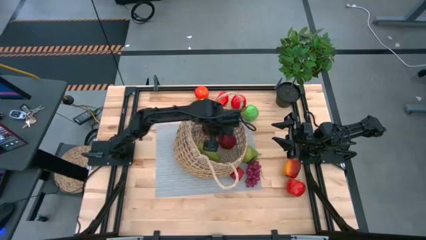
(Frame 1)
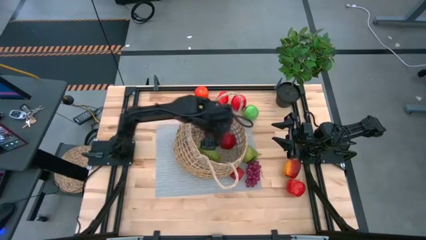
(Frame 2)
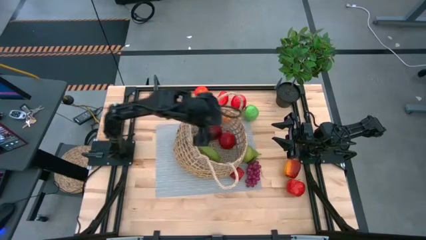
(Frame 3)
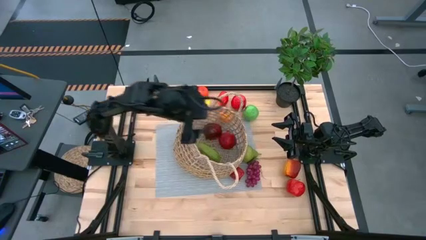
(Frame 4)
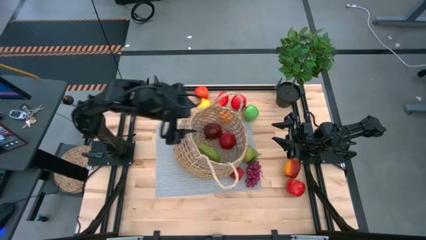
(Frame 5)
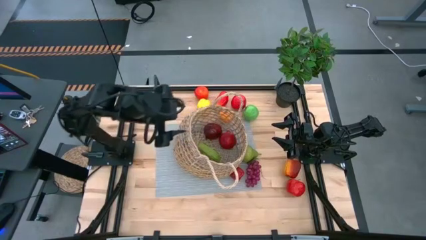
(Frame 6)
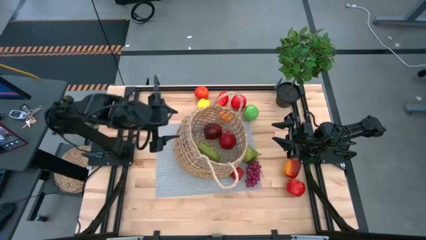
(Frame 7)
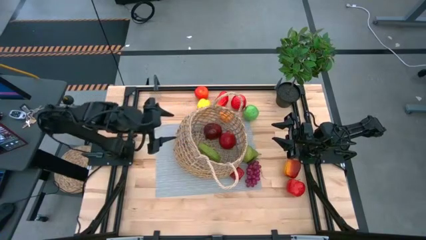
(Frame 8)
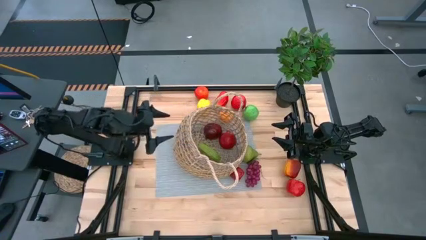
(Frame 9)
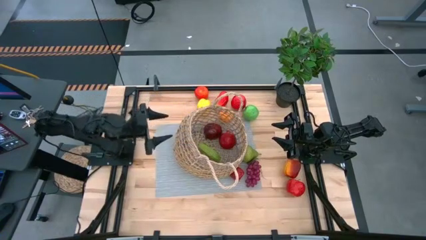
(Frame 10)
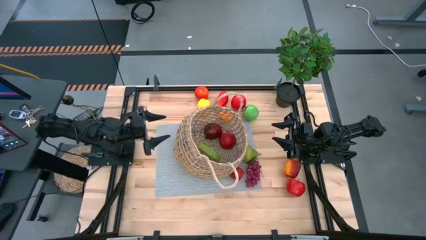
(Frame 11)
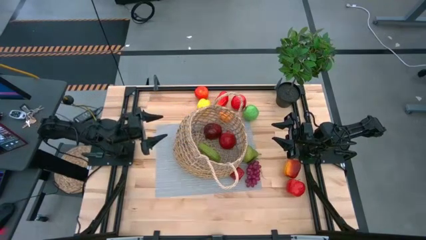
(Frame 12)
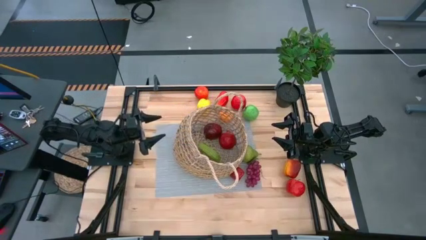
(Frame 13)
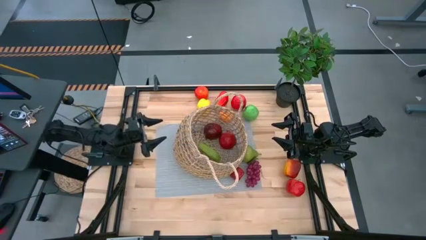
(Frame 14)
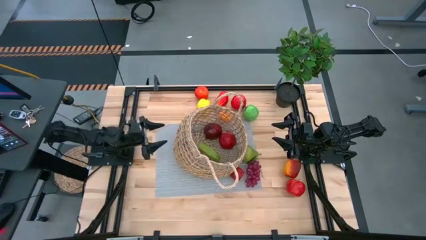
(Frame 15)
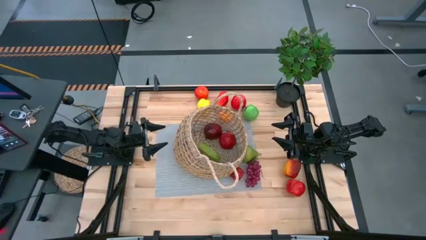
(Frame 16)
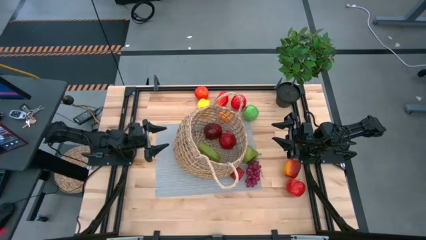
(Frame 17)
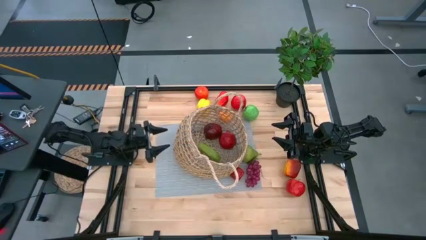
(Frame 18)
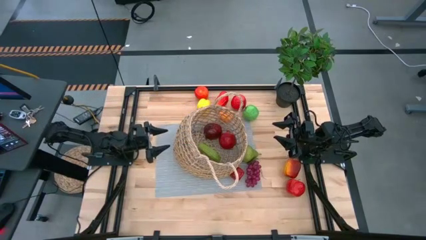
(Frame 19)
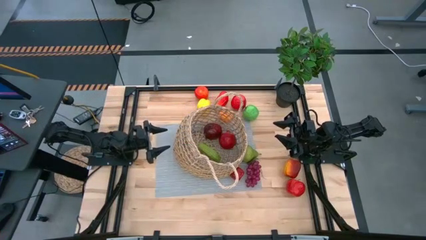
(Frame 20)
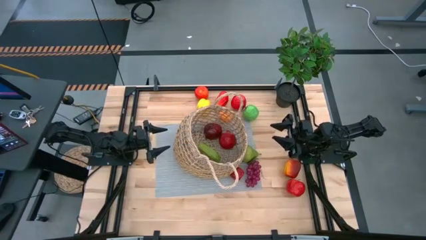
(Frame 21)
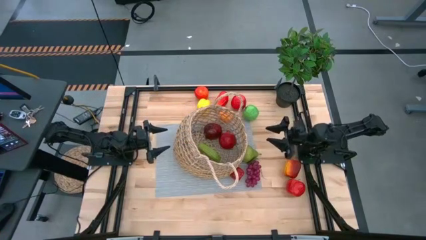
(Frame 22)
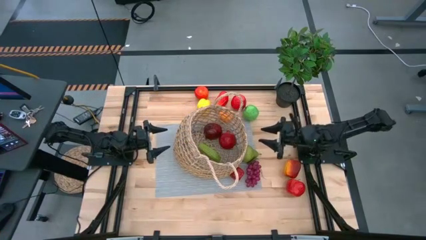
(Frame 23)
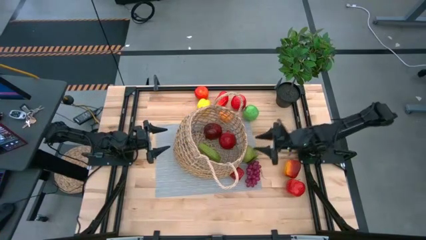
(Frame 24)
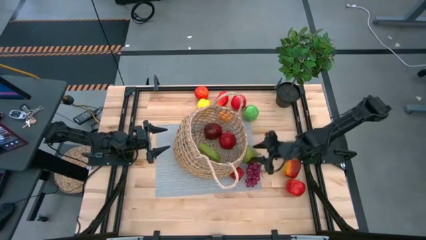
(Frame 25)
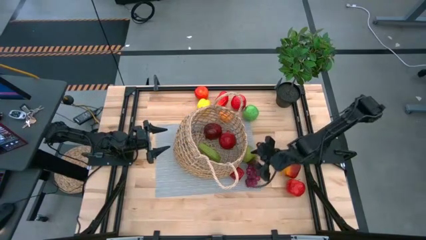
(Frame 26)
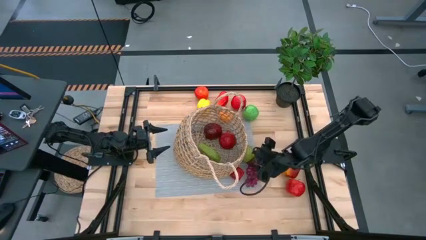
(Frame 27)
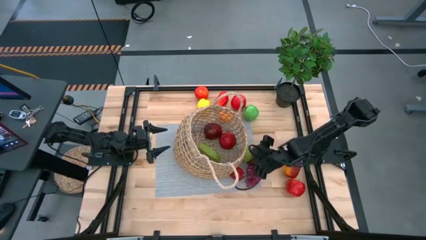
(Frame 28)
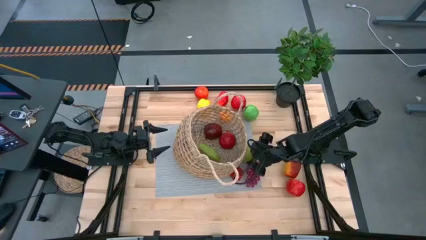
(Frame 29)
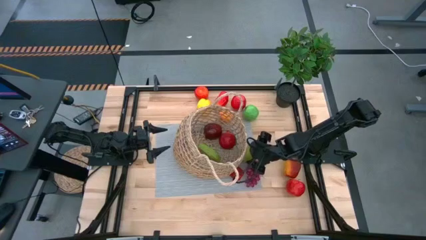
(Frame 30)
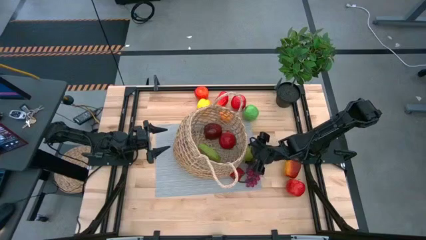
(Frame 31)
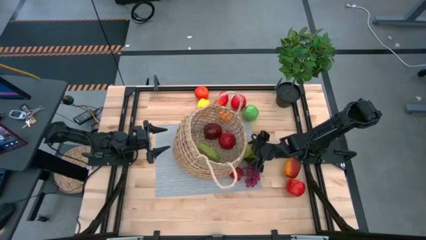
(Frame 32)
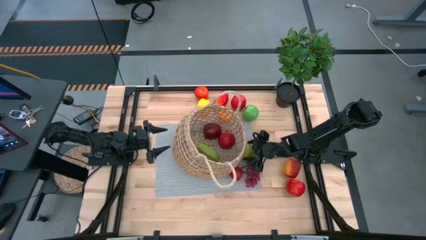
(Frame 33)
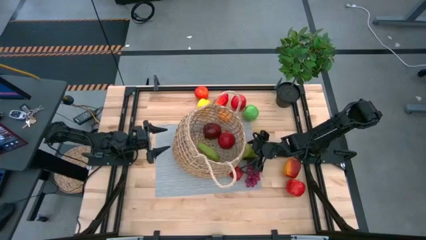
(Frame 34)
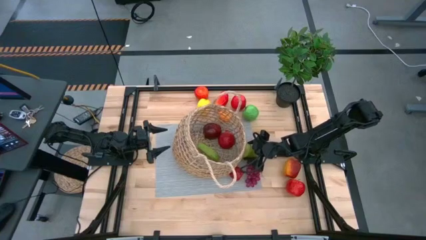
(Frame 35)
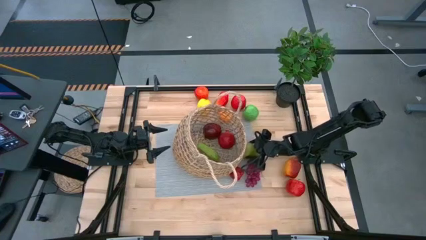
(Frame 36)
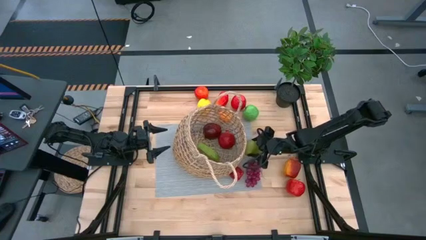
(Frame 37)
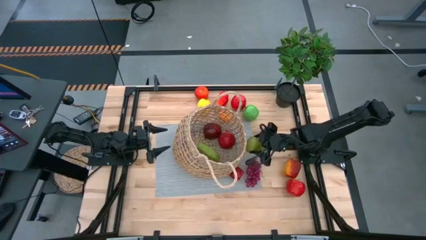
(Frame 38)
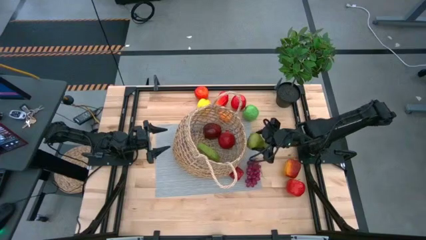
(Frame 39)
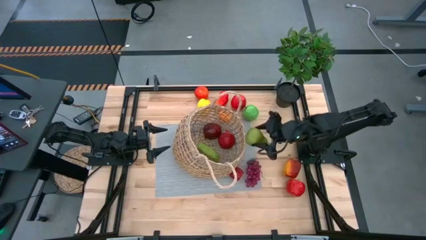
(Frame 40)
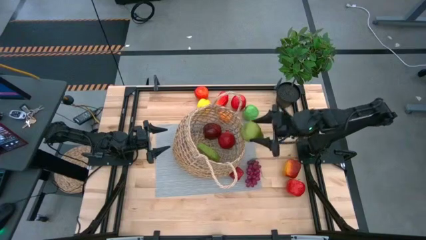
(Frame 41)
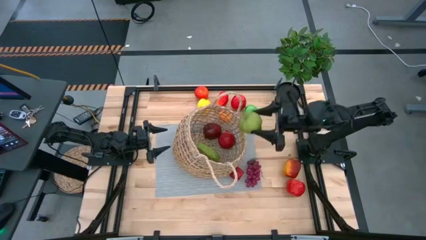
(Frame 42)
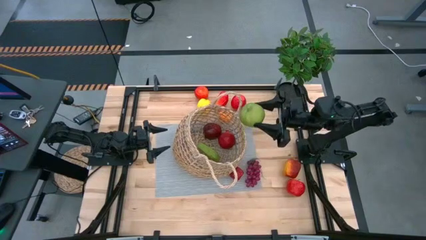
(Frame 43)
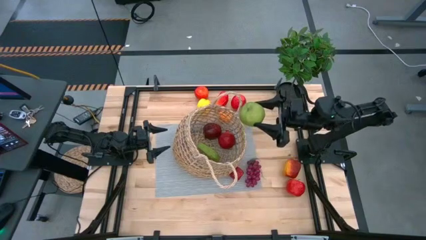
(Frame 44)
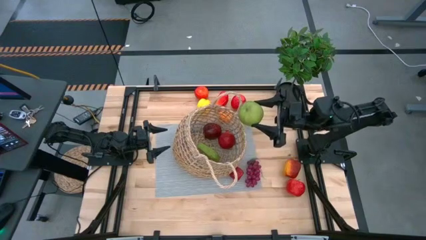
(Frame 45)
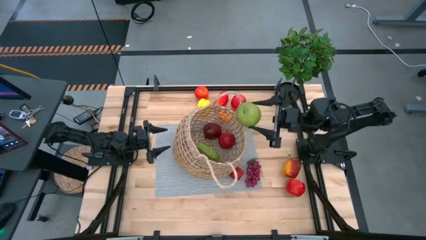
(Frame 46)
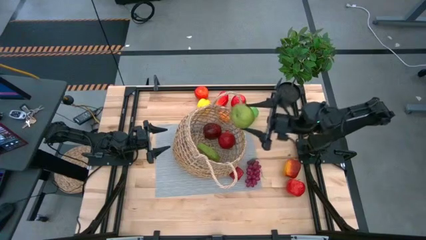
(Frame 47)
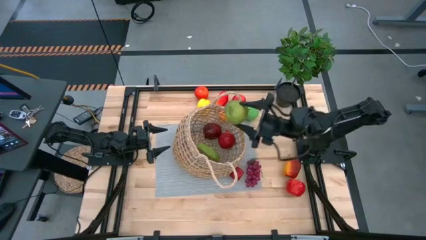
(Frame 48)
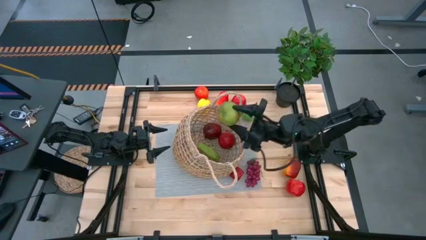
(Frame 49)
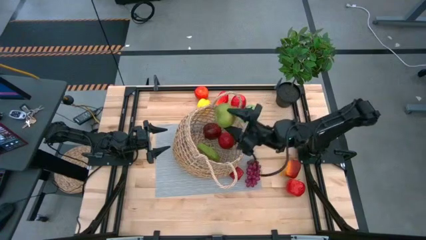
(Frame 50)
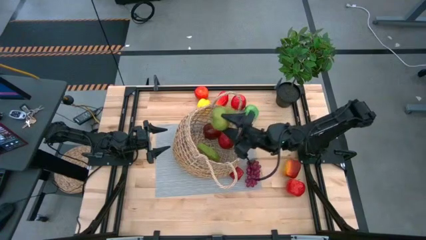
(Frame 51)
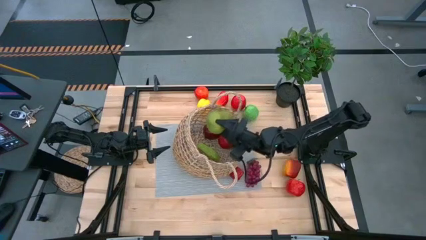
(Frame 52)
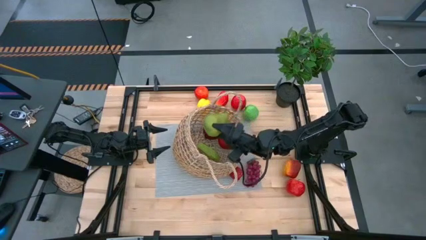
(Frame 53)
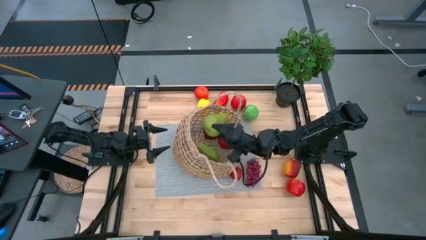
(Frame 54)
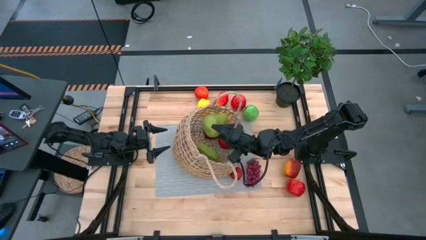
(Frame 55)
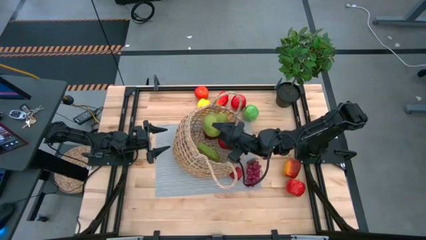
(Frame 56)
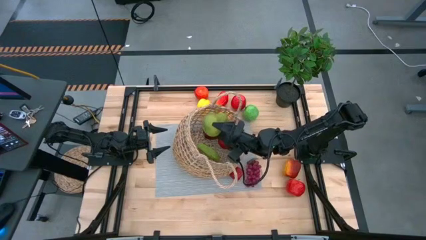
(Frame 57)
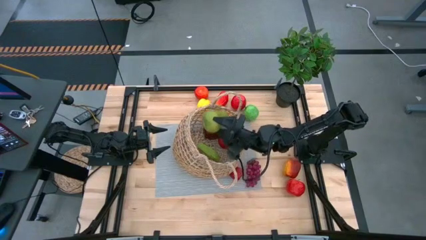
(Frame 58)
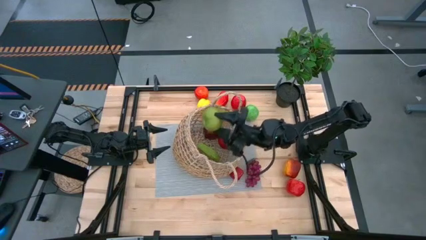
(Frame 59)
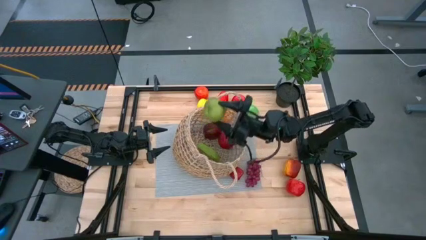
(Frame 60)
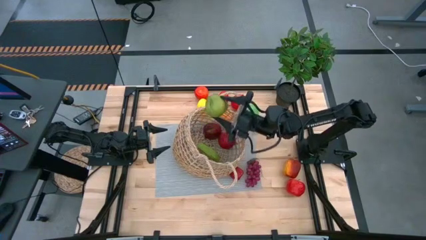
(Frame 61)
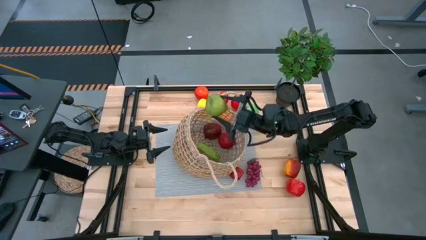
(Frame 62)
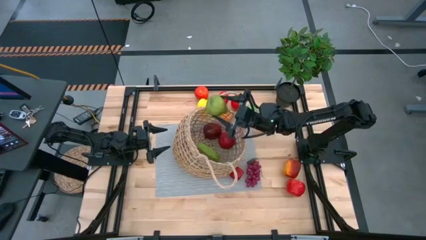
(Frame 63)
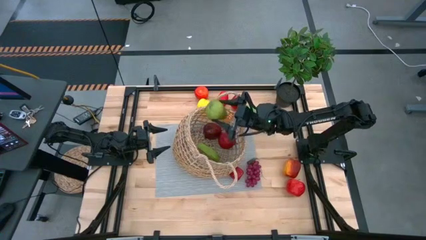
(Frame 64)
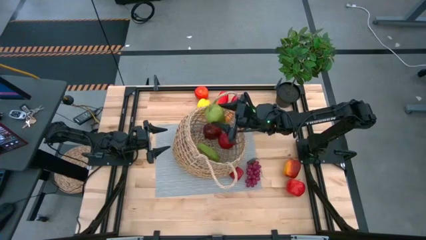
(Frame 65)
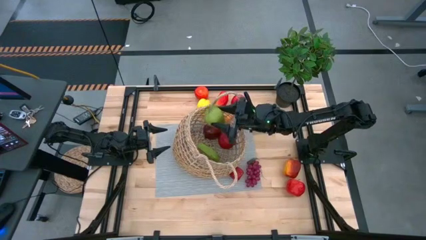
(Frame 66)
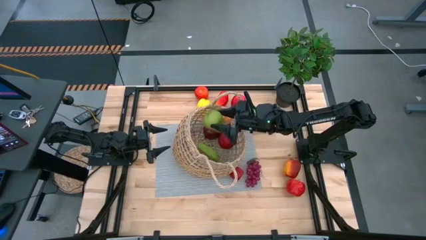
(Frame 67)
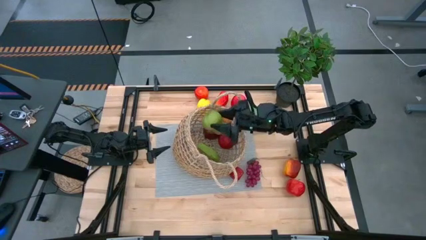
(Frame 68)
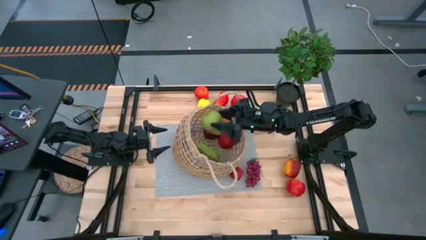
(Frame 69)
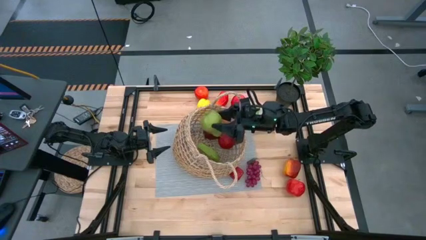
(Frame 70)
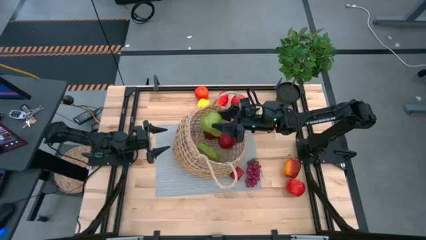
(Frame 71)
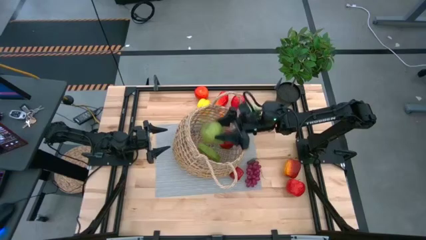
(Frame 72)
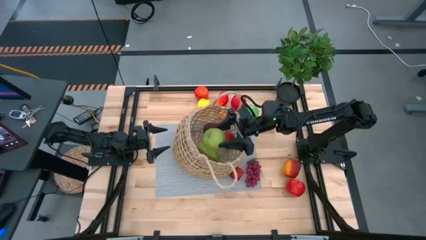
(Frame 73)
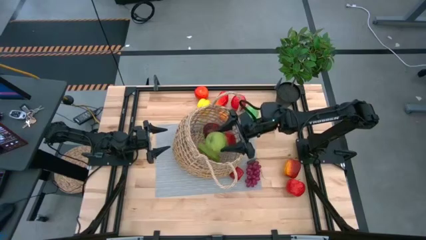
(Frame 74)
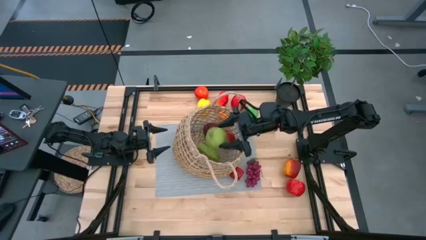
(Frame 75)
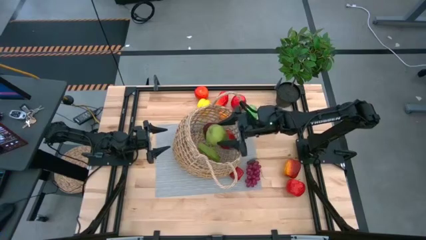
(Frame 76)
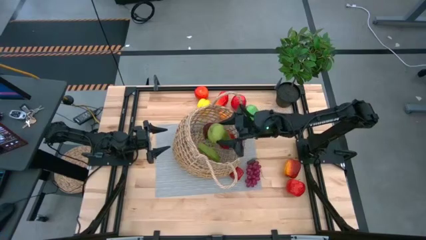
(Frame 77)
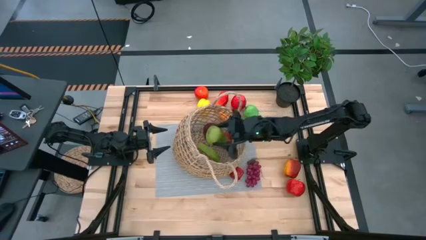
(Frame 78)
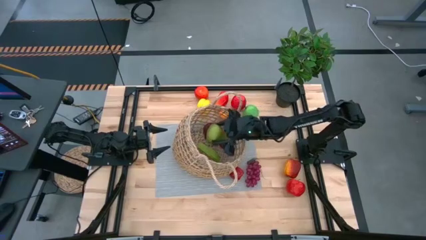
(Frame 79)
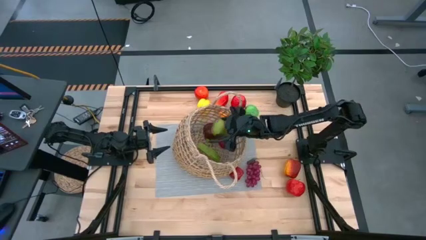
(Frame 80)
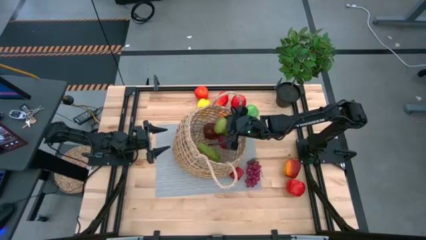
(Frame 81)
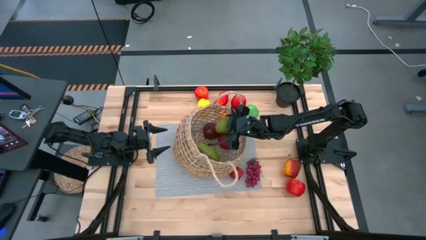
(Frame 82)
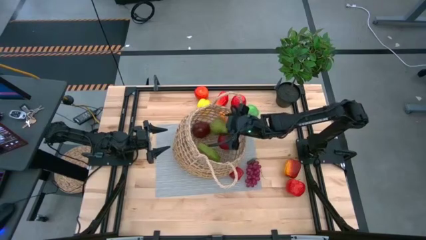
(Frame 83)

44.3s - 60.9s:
Task: Build produce basket
Put the green pear into the mesh basket

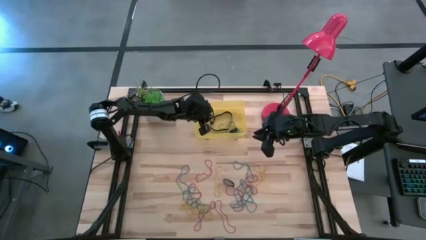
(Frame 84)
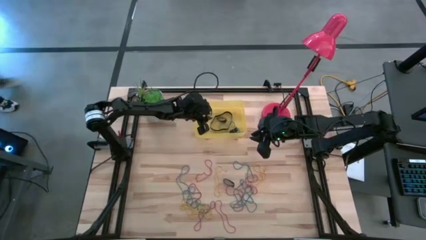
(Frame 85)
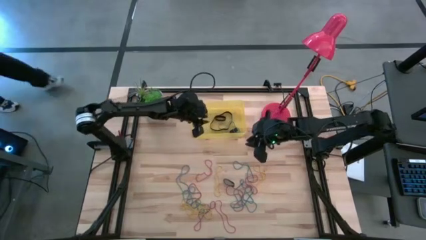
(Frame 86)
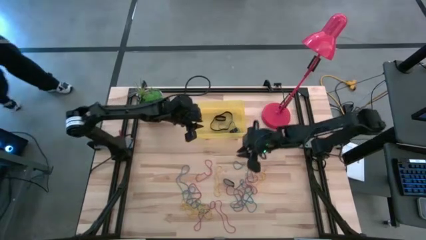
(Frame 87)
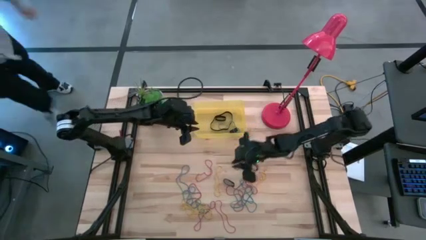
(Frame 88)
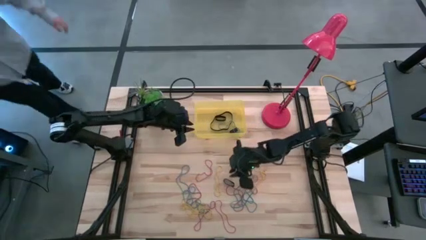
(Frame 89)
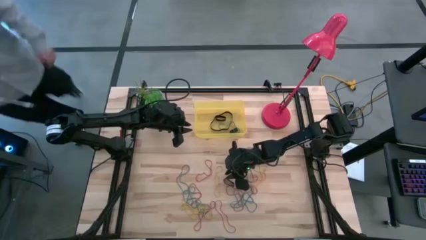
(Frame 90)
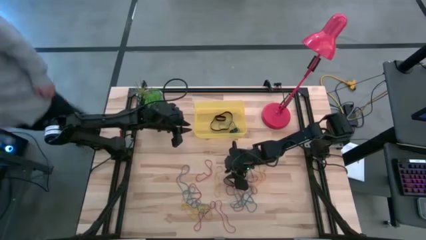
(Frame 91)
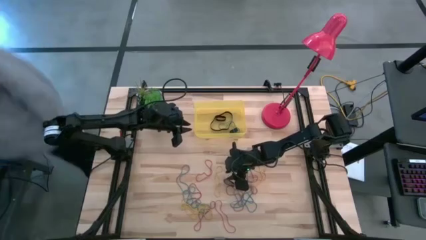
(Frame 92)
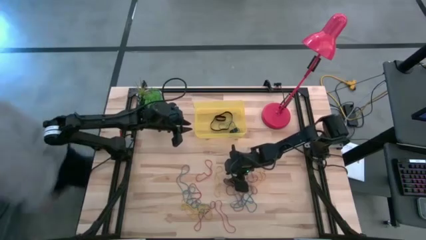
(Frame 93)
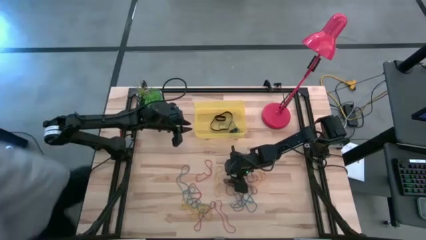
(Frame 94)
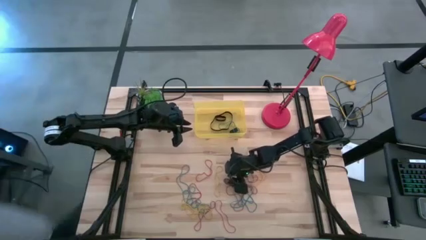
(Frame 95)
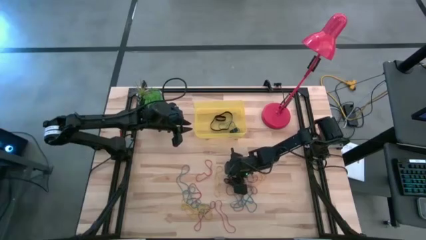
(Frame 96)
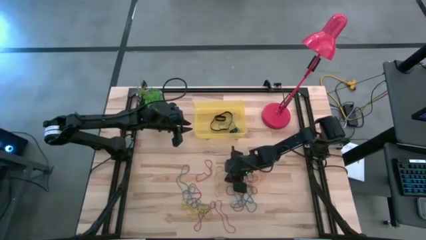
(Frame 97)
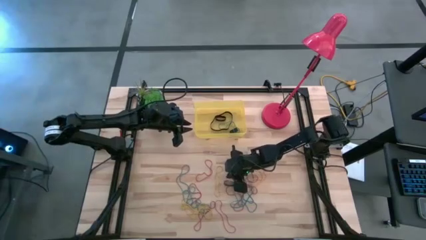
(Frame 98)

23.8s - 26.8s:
Task: Pick and place rubber bands into bin
Put the black rubber band into the yellow bin
